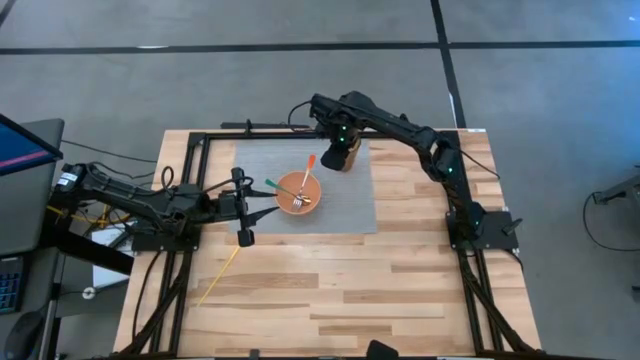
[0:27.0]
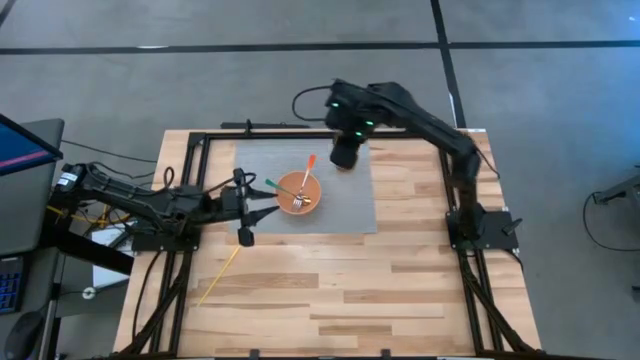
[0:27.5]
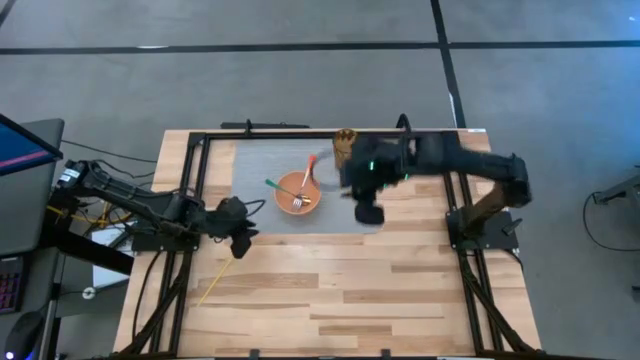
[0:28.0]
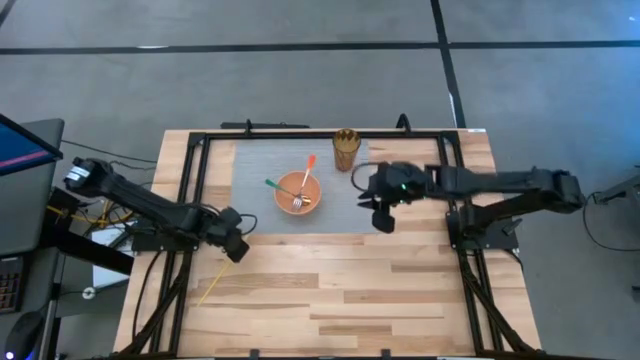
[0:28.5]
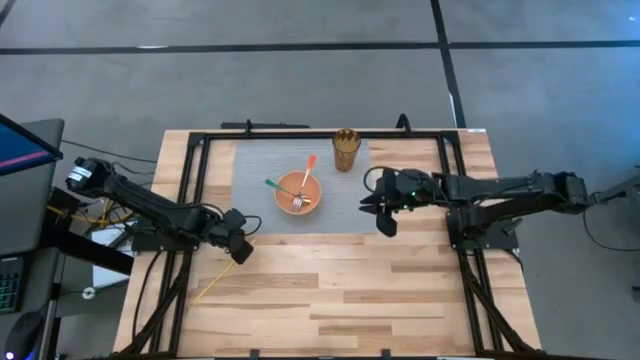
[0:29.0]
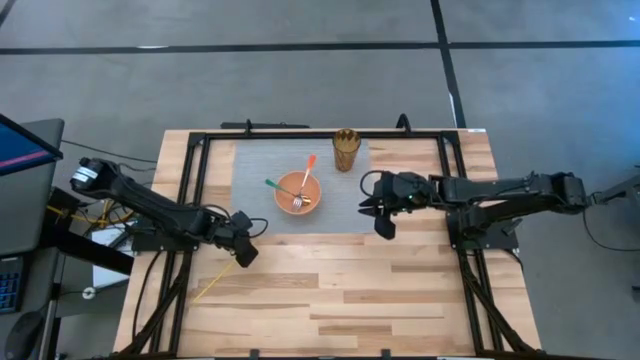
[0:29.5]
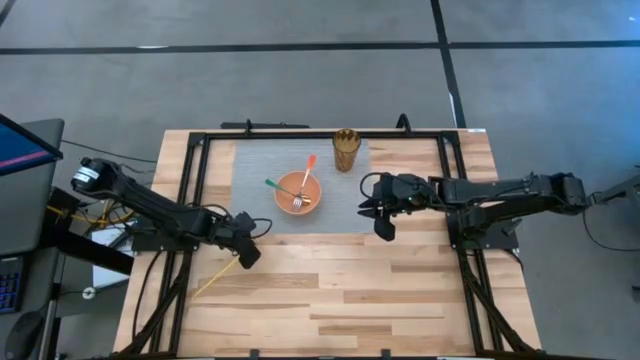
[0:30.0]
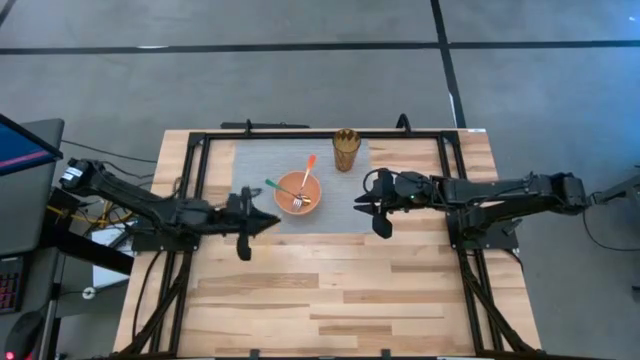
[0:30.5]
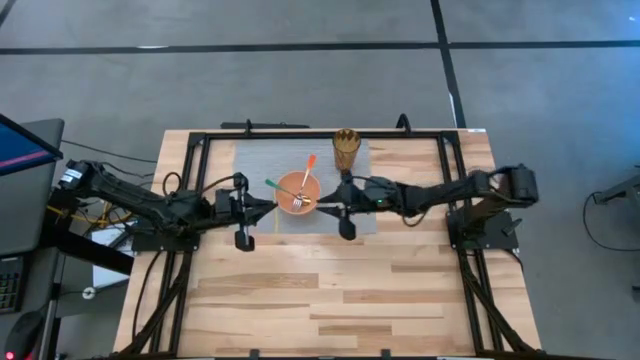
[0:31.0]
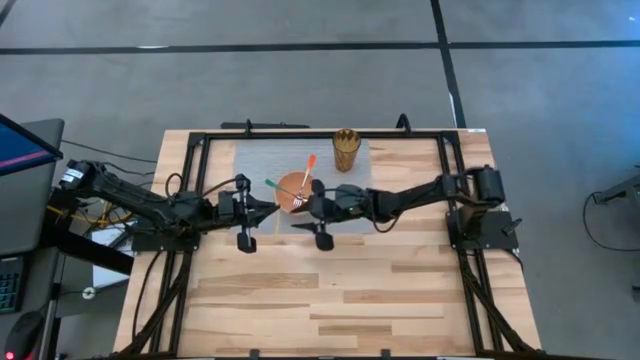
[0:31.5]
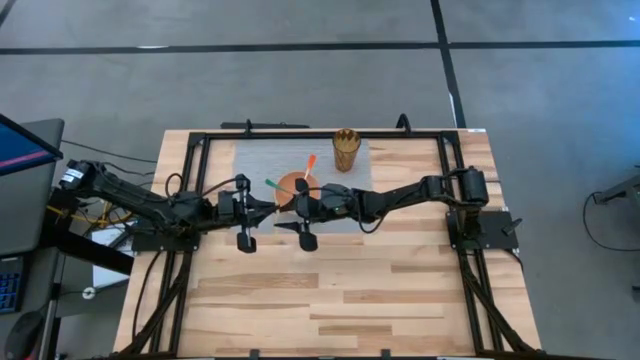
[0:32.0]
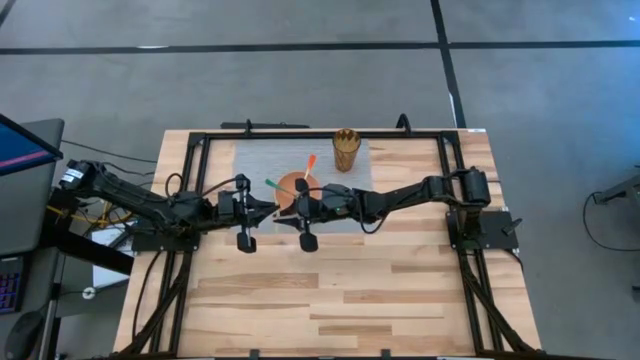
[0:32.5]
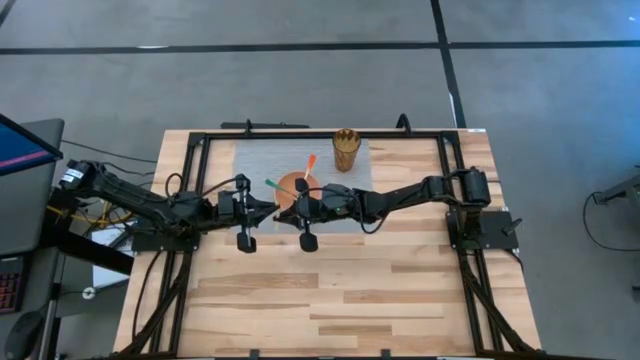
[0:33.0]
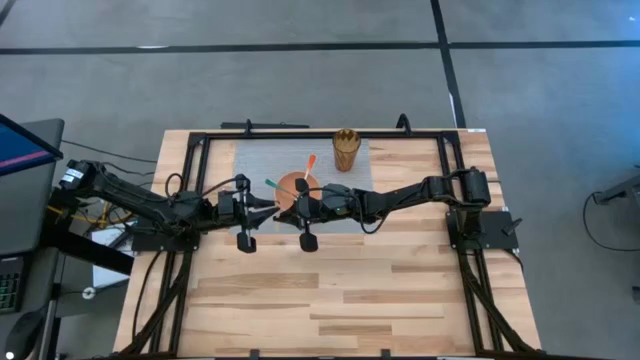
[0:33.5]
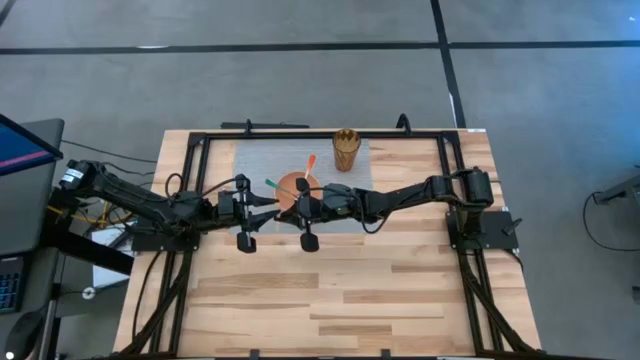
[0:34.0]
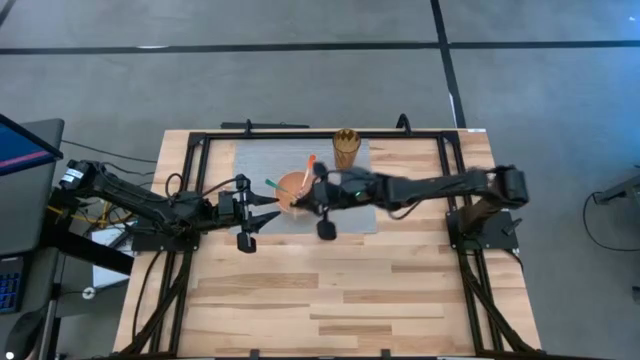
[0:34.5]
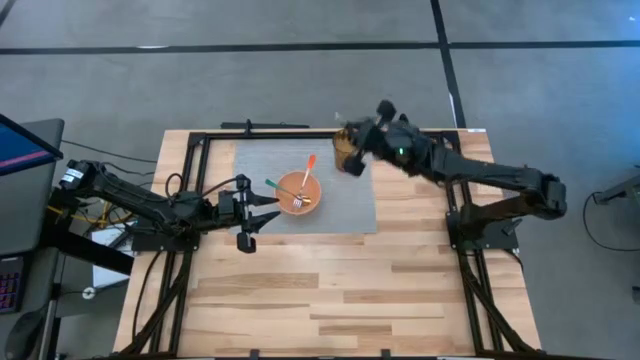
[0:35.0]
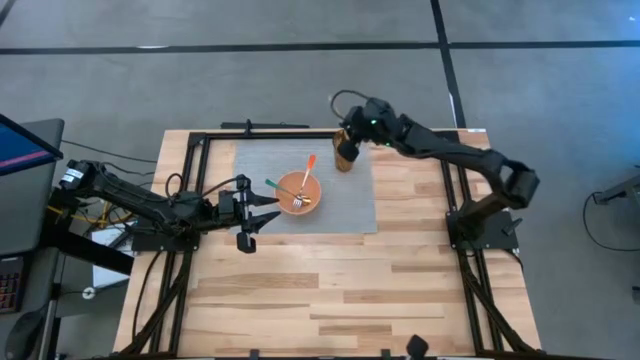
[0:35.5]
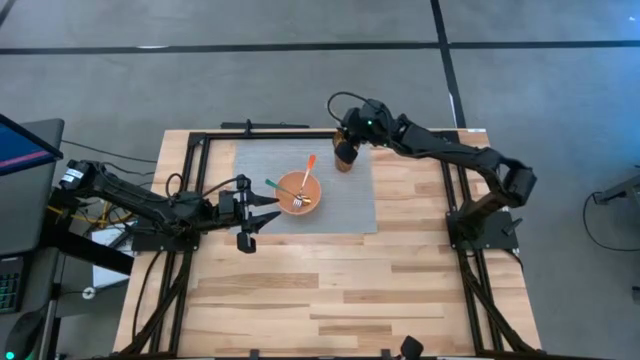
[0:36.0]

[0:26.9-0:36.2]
Task: Pick & Place Utensil
Put the yellow straw into the yellow cup

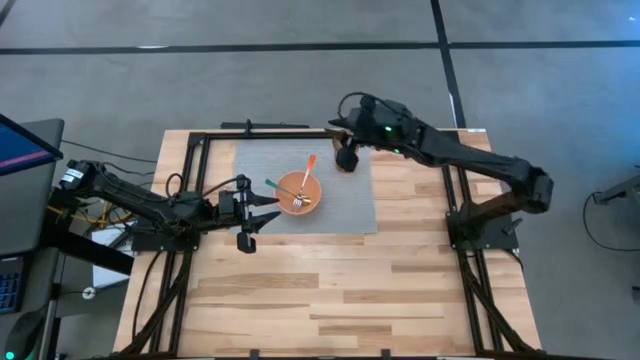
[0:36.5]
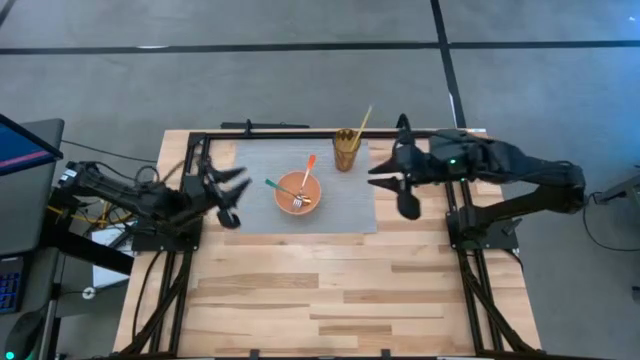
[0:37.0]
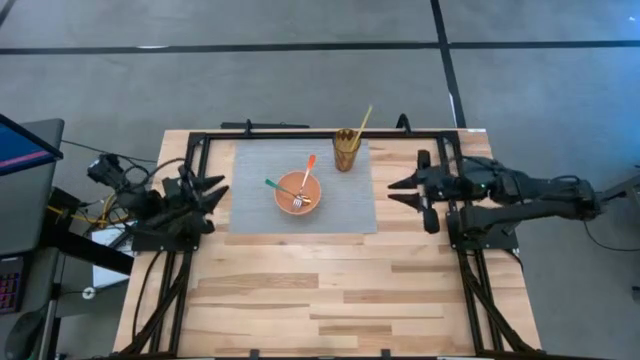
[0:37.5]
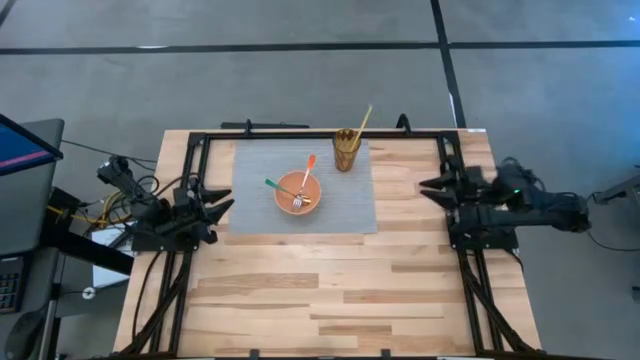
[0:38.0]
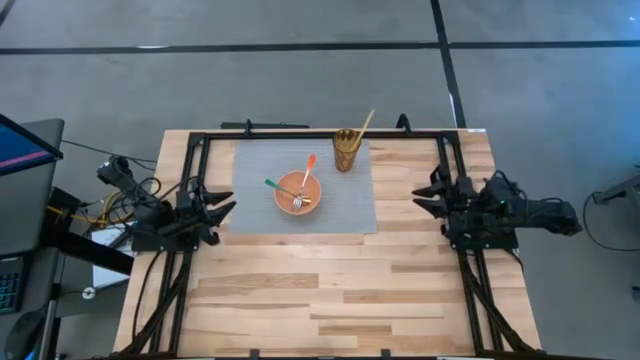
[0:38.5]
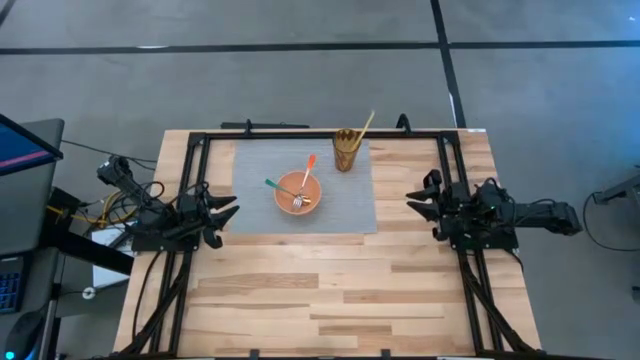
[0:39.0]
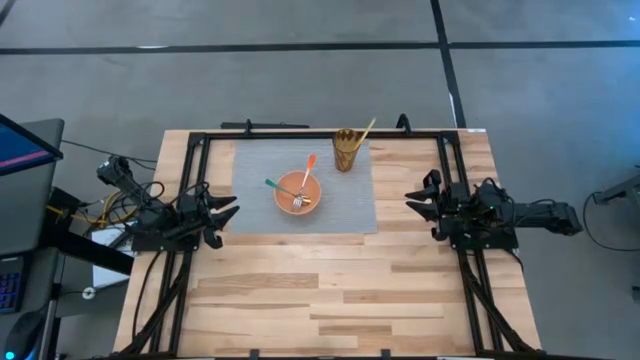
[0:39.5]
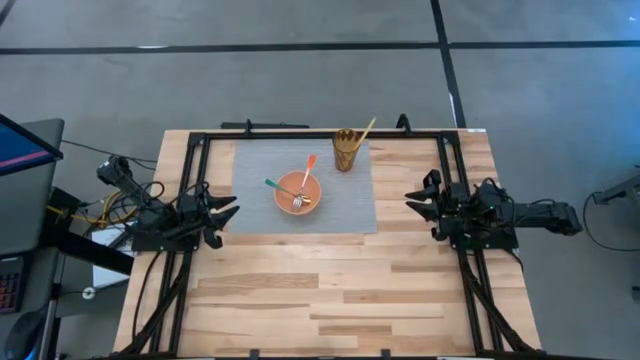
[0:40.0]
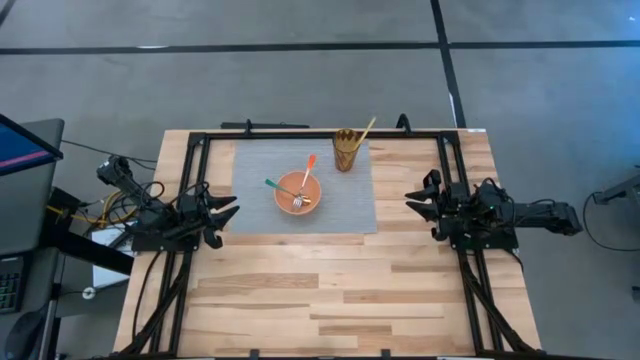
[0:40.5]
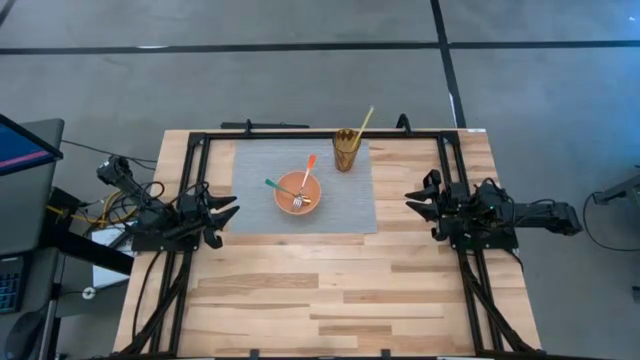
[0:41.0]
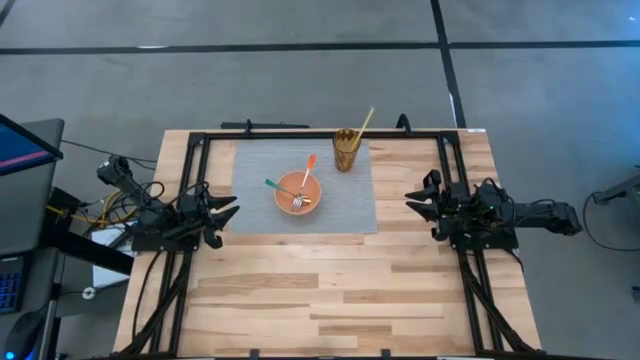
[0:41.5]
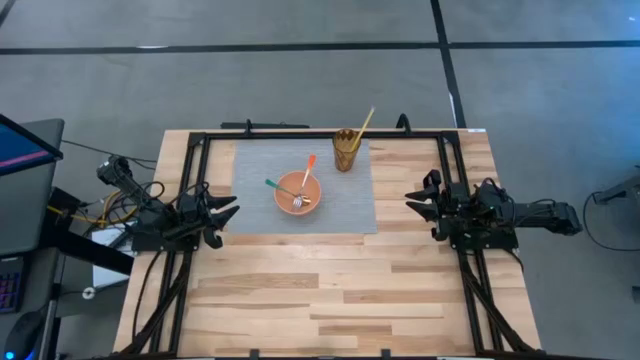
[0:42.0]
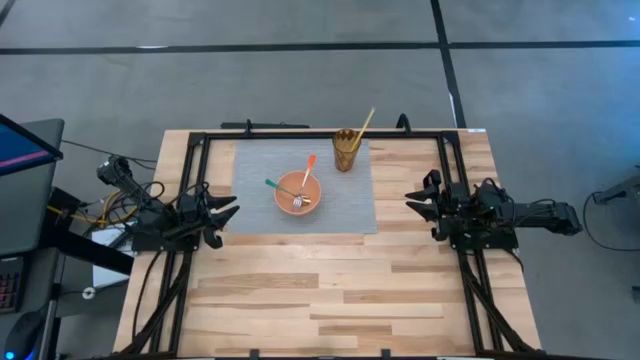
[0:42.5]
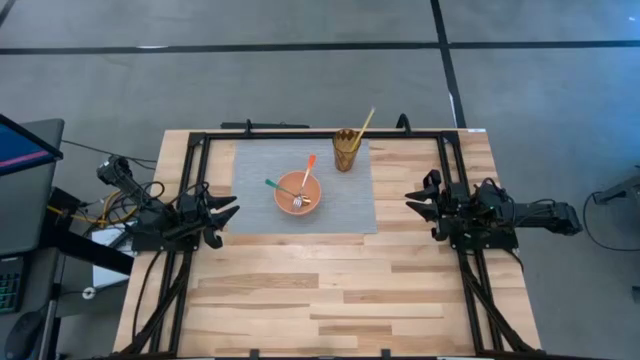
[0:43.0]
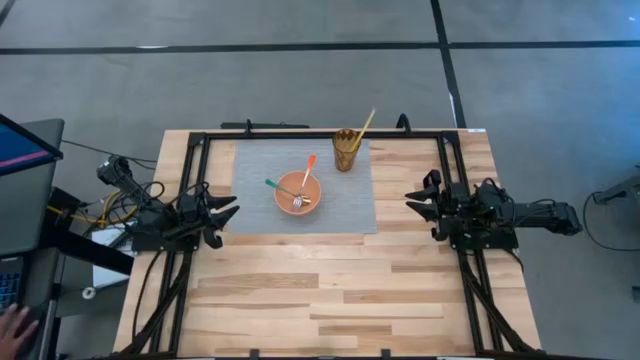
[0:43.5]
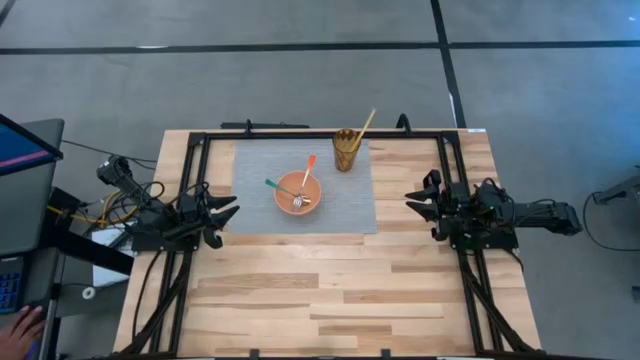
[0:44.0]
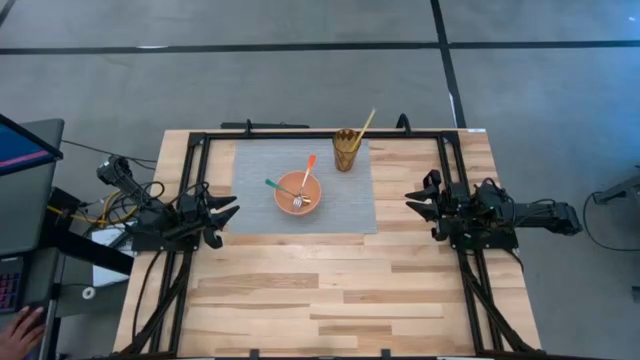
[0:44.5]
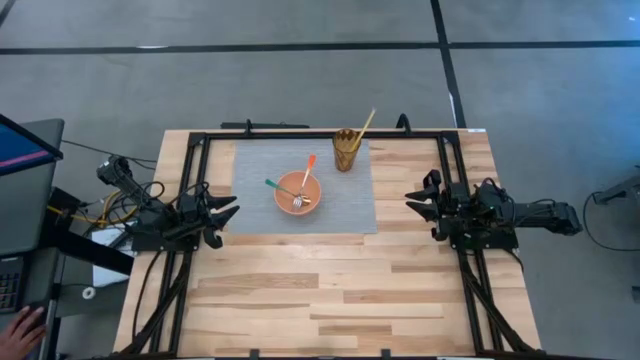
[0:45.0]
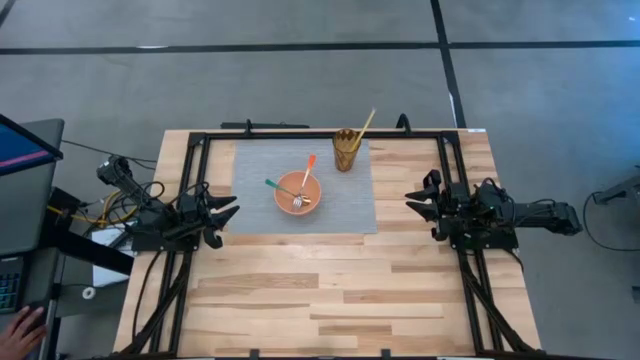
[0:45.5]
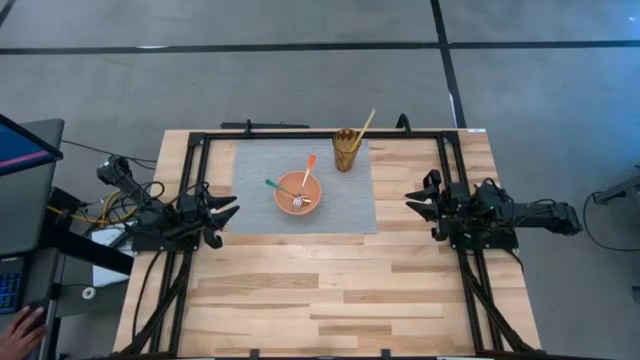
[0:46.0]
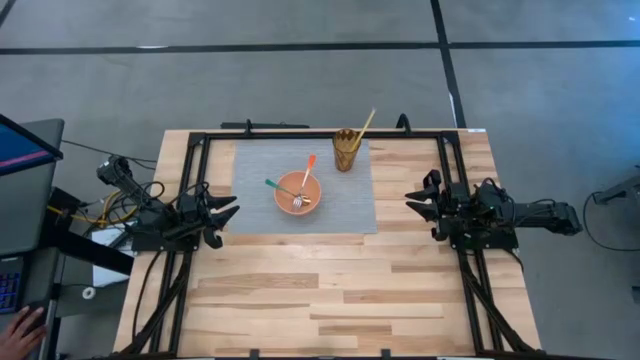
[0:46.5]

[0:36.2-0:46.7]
Return to Home Position

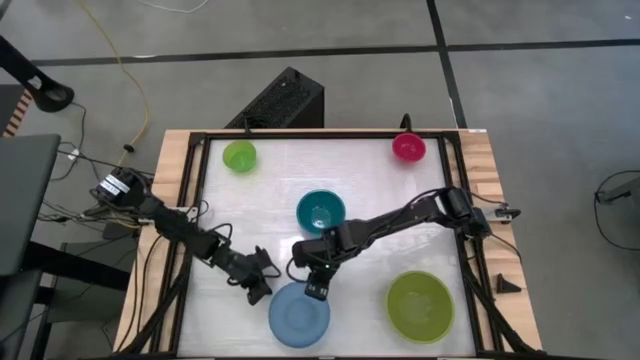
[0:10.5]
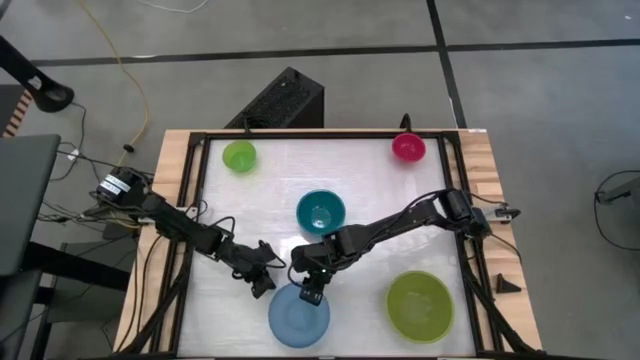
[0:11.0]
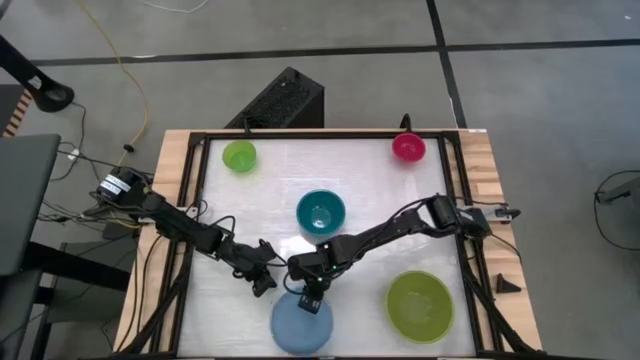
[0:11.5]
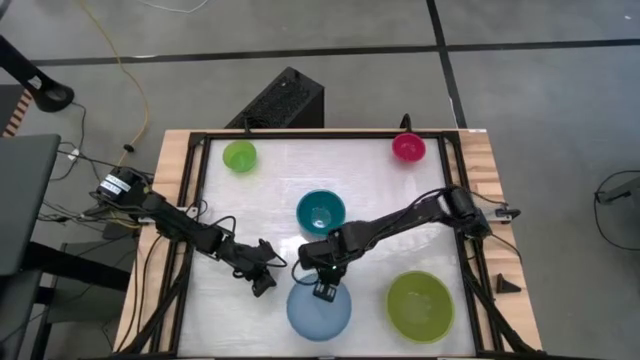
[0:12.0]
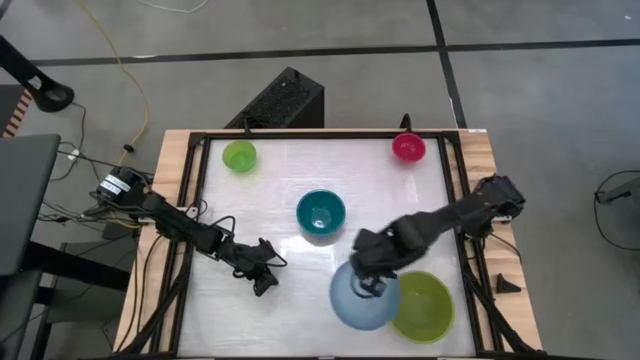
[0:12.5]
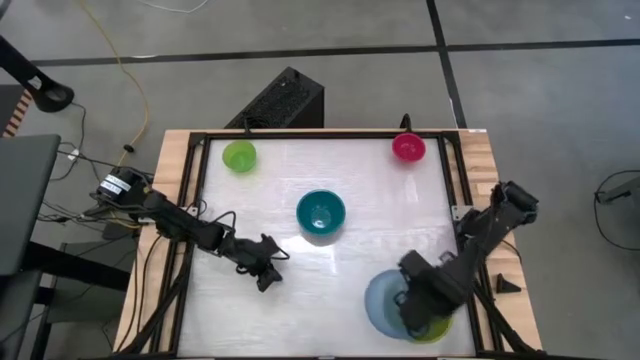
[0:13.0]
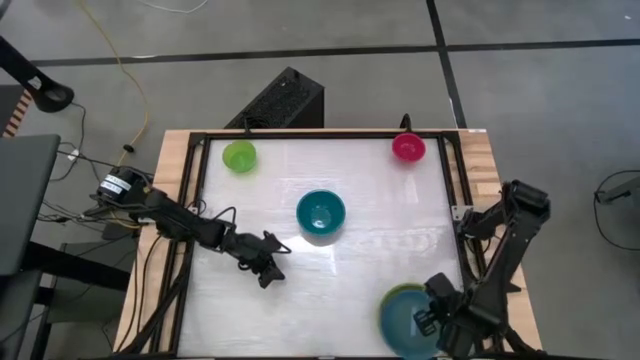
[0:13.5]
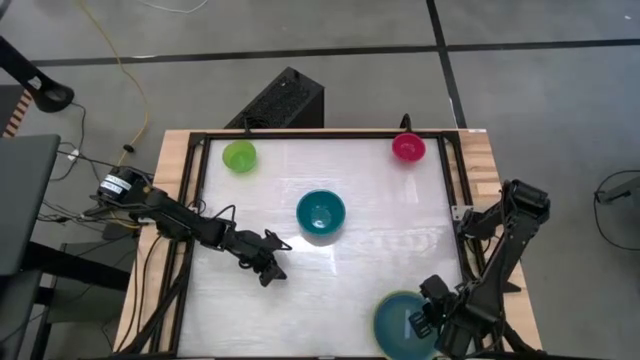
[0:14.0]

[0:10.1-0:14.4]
Task: Nest bowls inside each other by size order
Stack the light blue bowl into the bottom green bowl
